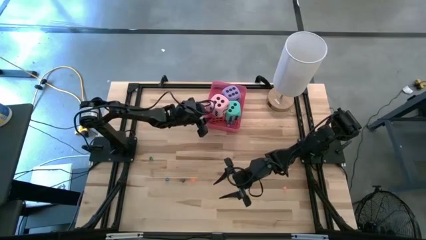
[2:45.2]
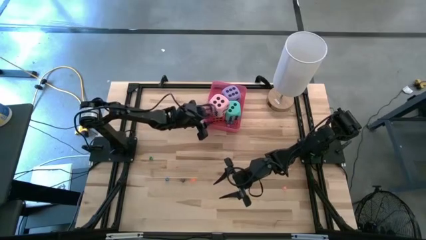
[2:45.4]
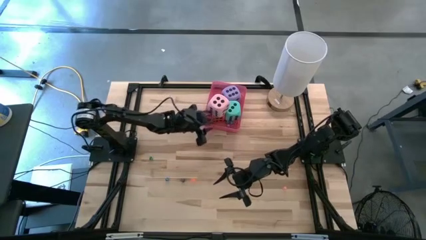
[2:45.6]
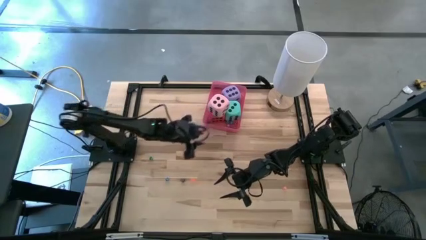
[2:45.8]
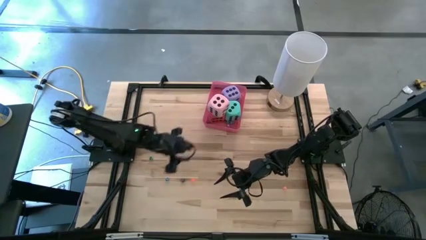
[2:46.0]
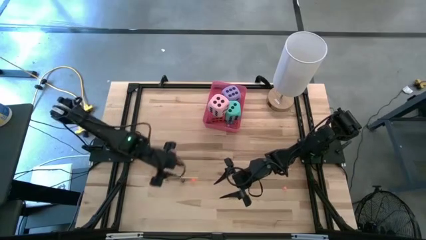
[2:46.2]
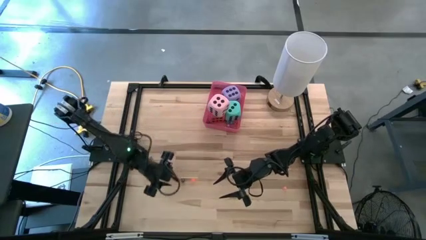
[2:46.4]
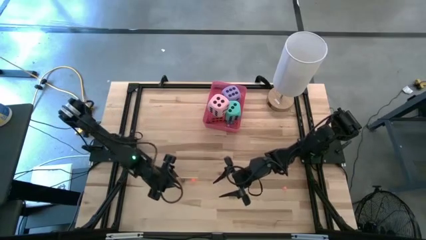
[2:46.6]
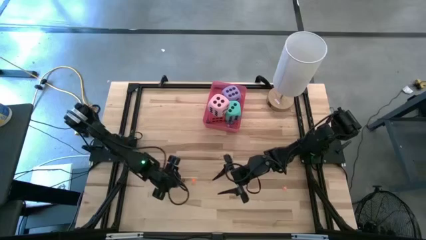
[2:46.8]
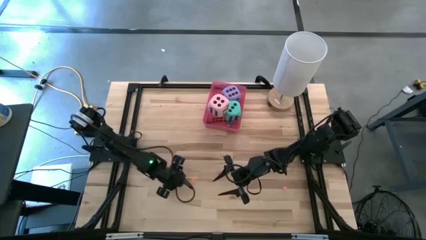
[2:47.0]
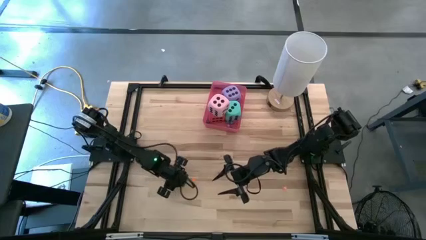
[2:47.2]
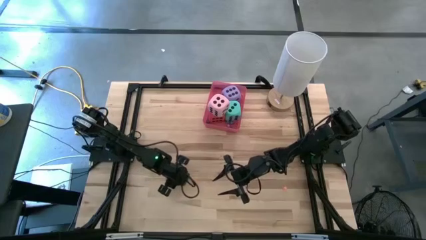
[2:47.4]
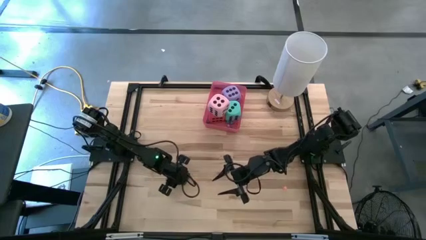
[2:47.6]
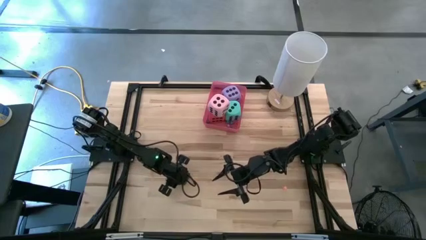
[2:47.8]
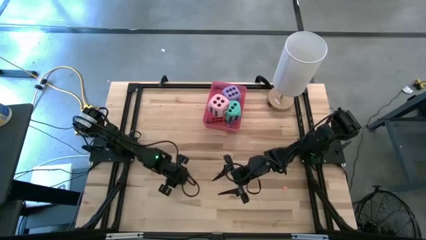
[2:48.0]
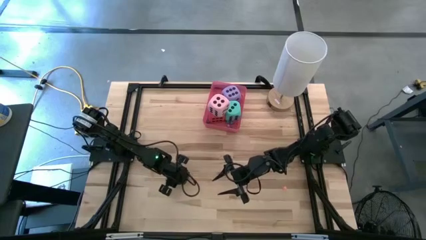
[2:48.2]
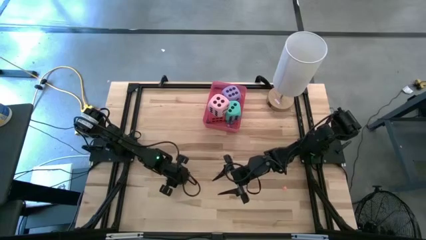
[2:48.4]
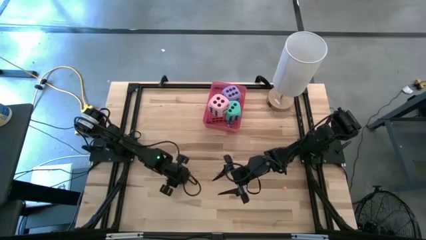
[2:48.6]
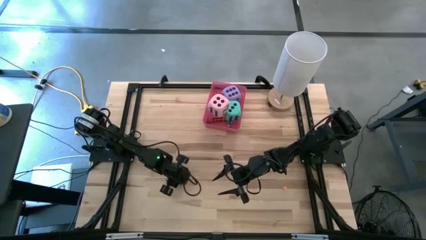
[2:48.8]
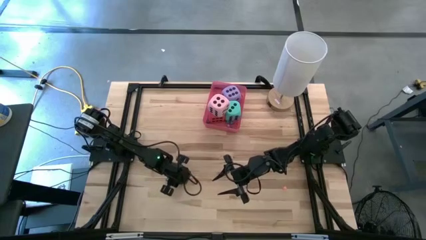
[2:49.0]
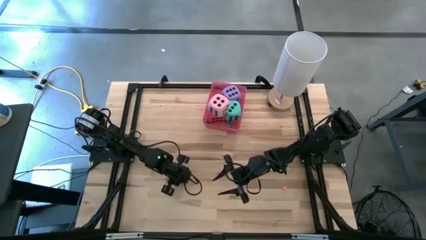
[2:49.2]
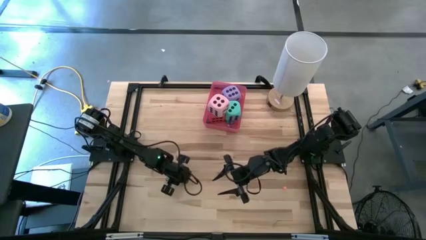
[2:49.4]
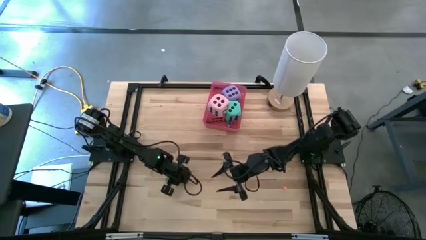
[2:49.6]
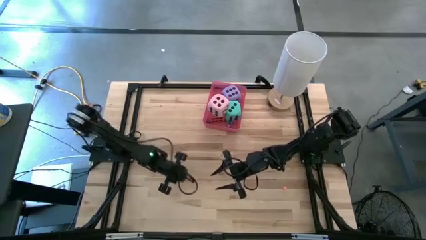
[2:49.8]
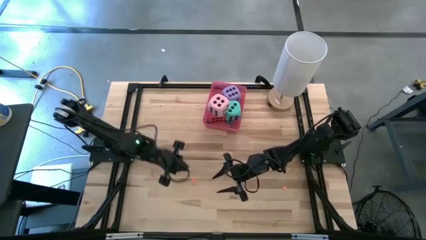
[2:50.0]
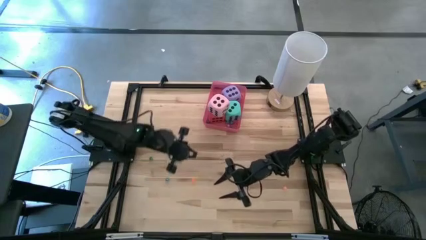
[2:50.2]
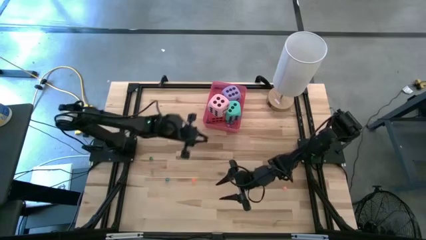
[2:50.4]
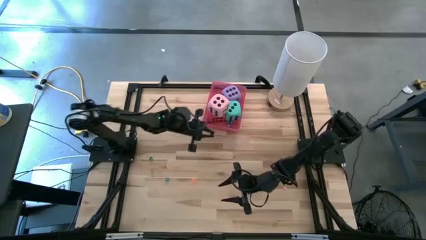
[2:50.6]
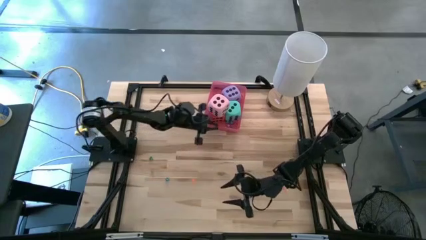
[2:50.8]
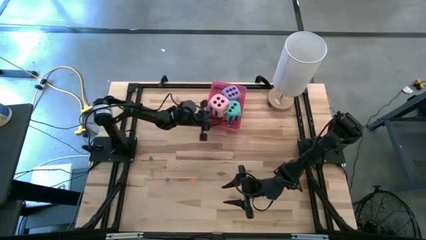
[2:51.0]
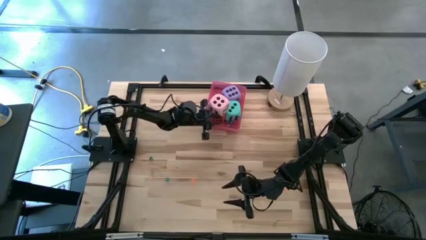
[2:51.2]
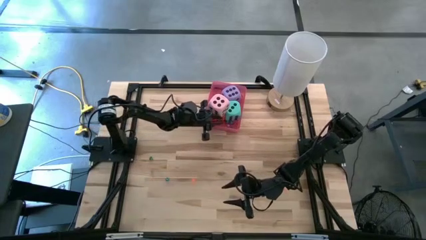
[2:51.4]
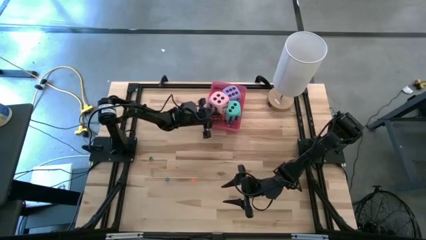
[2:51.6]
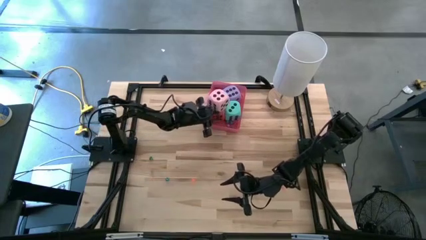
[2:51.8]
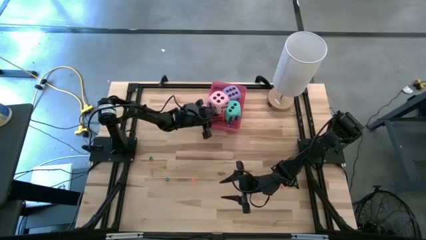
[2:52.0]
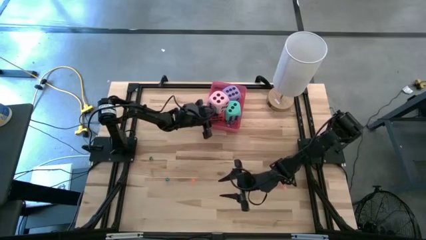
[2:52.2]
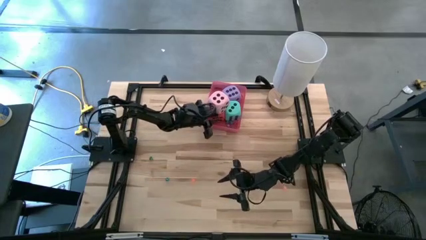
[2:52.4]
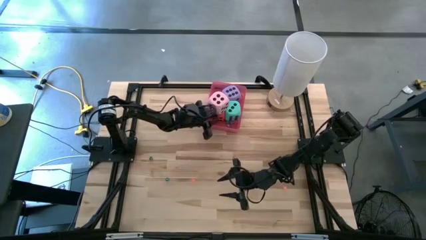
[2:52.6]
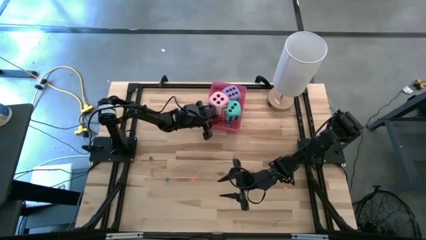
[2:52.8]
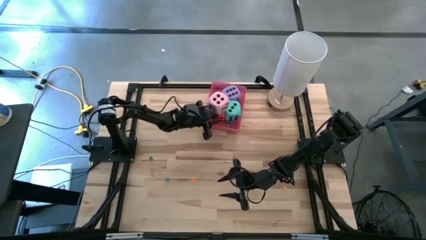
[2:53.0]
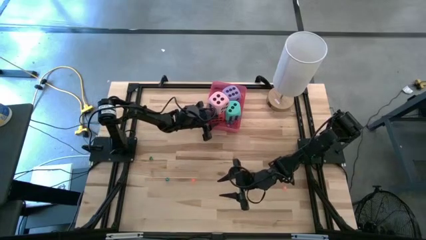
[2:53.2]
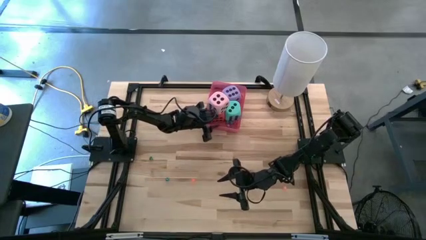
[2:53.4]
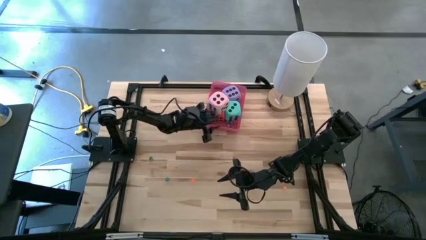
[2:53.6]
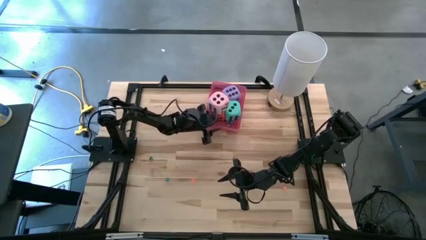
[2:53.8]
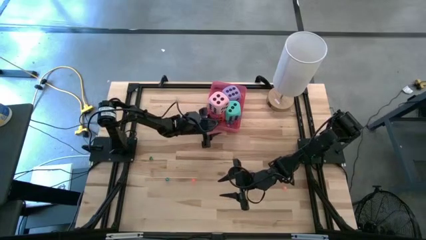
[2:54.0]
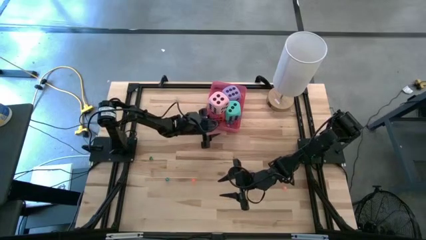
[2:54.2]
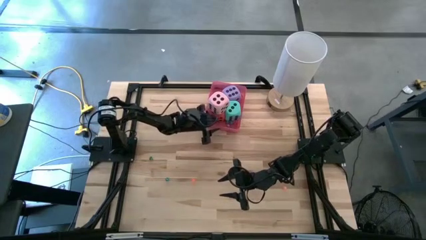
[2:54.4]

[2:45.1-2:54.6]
Task: Pick & Place Dice
Put the small black dice into the bin

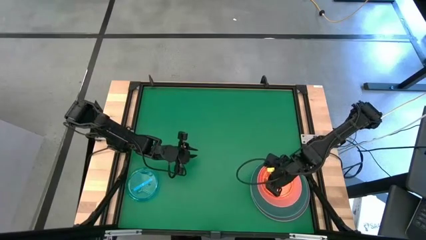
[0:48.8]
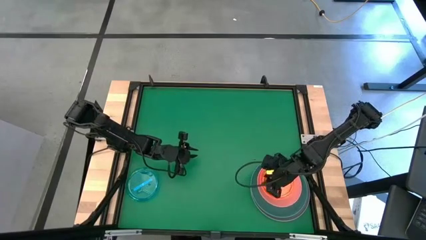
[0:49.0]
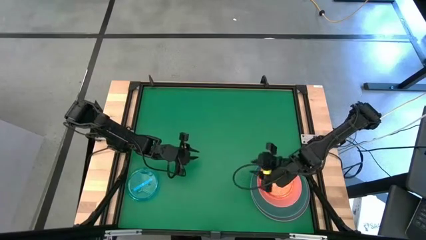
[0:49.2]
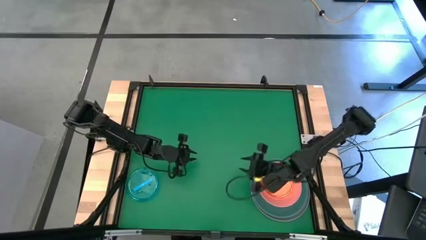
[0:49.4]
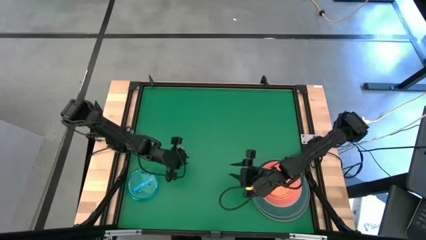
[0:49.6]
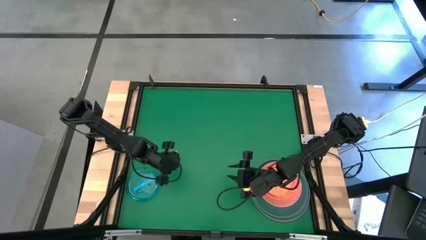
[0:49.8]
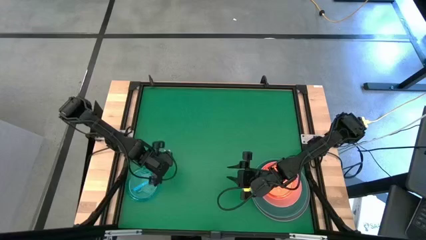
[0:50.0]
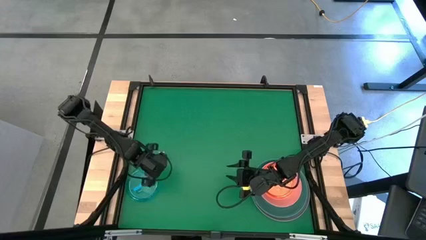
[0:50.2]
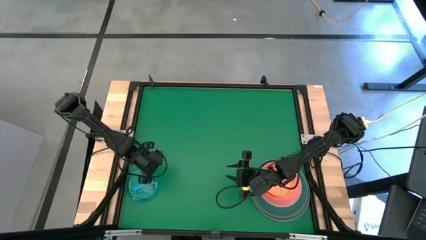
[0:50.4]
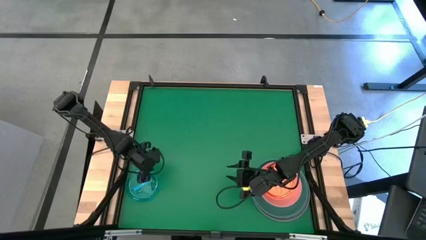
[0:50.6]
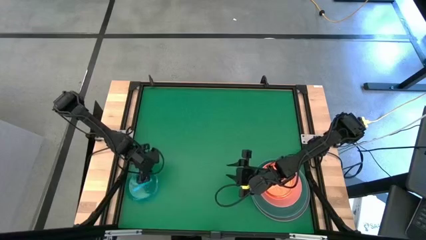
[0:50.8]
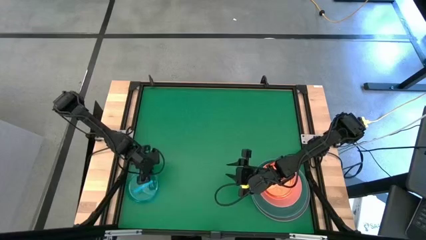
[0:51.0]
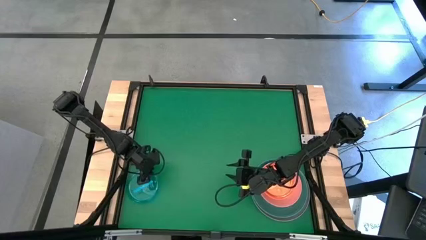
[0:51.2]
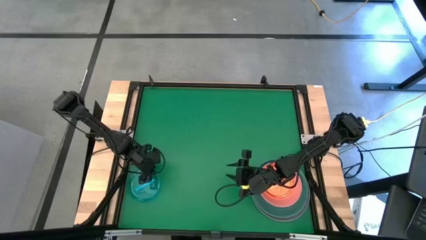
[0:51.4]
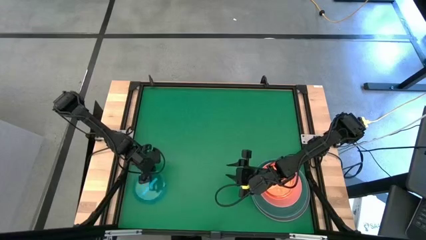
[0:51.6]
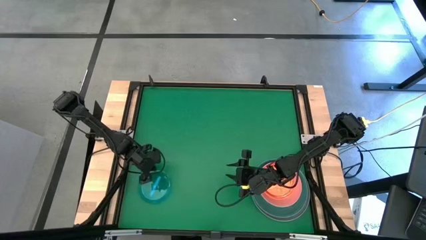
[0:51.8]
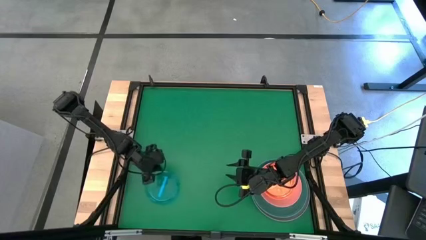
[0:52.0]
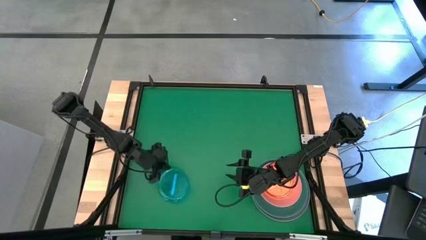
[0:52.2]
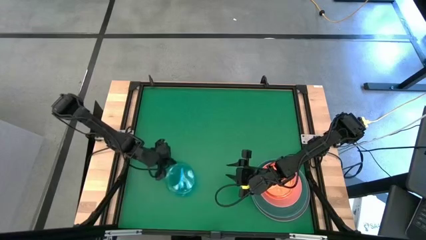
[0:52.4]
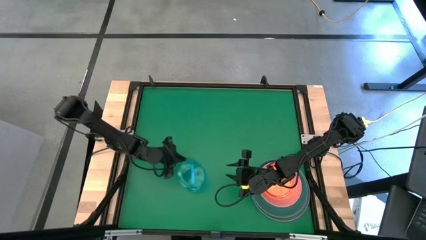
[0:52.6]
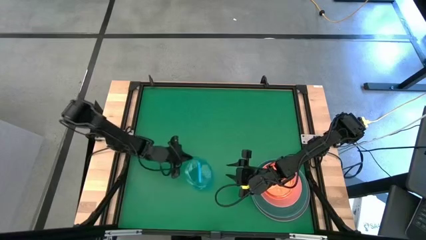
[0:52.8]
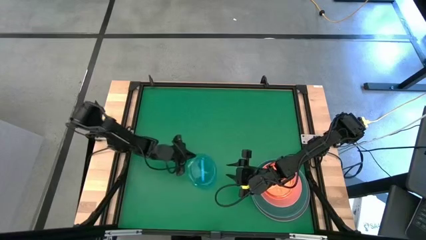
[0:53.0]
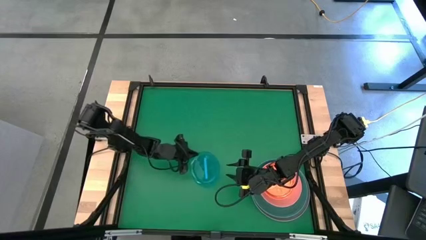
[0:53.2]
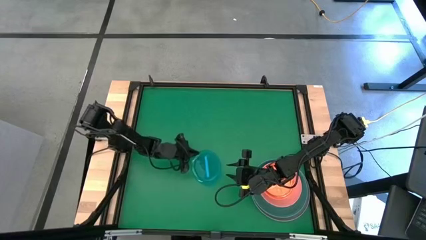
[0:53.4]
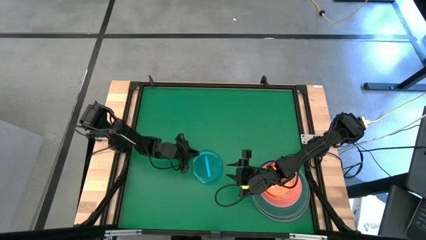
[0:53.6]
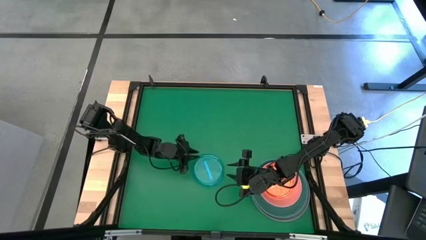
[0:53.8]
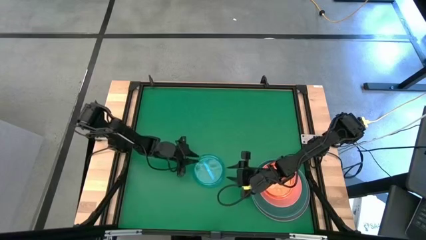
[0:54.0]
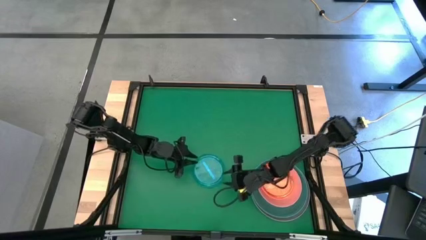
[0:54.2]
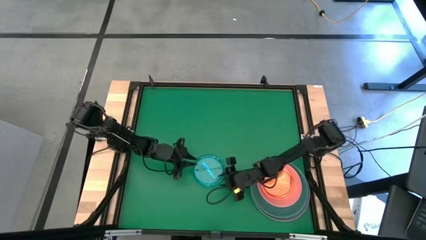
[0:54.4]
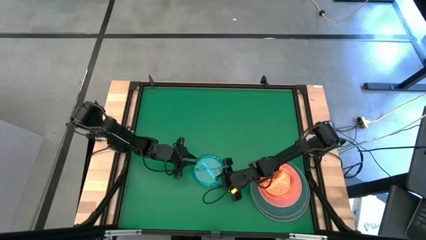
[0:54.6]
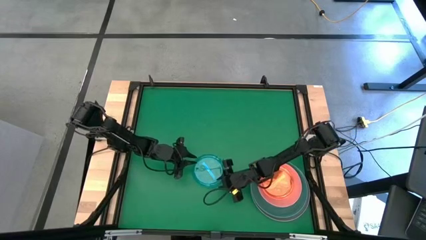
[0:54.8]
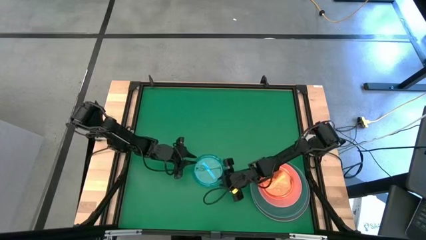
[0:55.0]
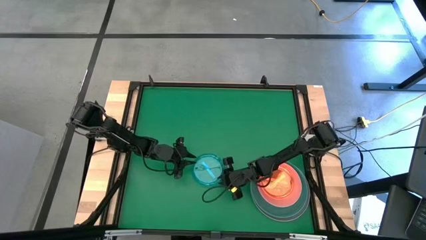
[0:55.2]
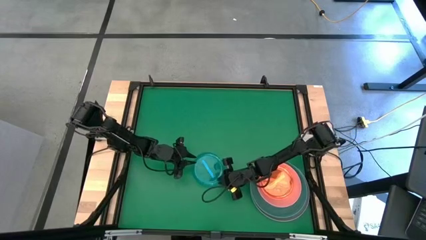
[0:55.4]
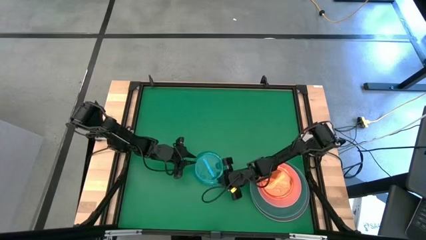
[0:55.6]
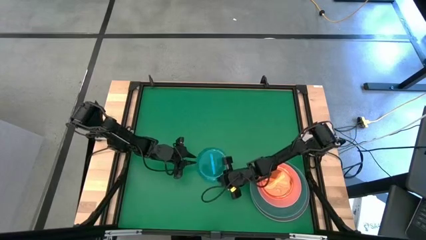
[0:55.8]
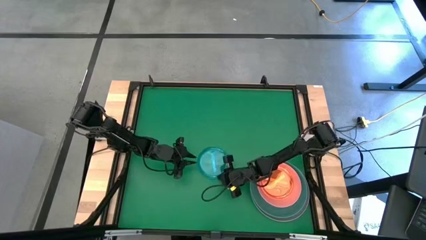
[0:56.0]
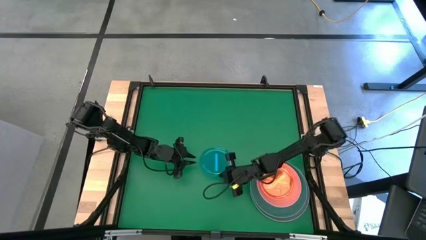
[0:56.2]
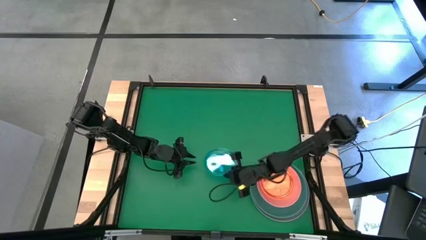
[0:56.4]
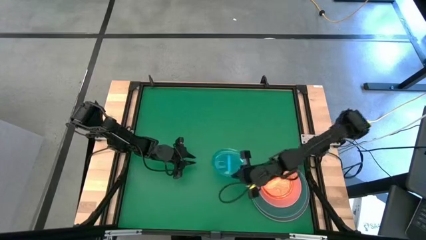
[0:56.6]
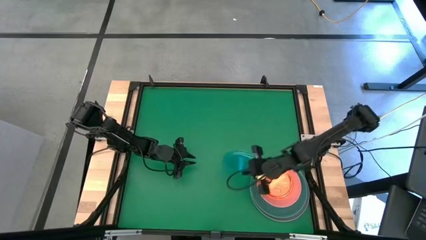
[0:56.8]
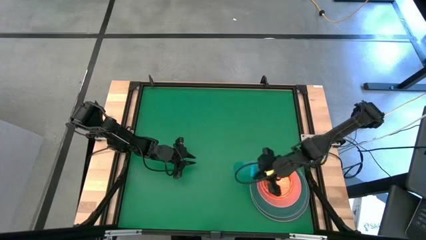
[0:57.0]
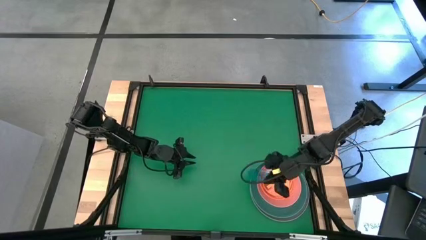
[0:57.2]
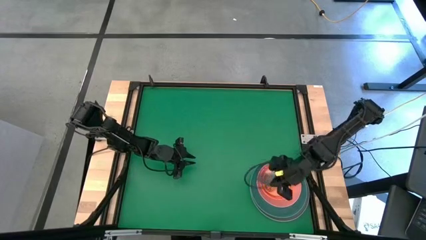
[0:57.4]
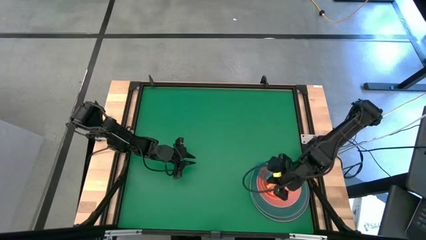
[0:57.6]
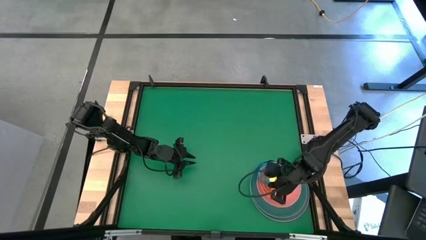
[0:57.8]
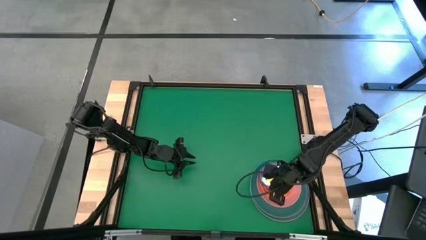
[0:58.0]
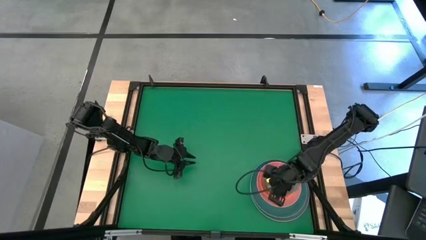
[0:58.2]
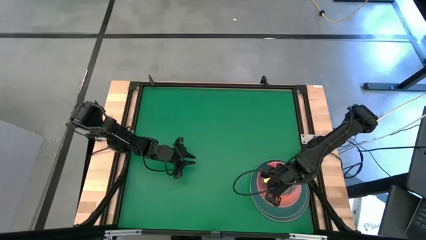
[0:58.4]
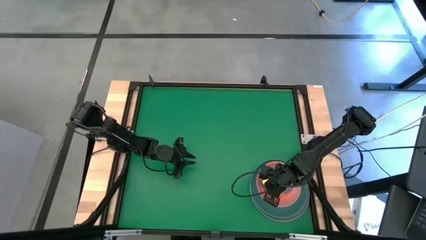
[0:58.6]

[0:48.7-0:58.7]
Task: Stack plastic plates
Stack the light blue plate on top of the light orange plate
